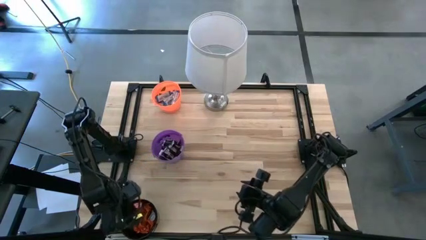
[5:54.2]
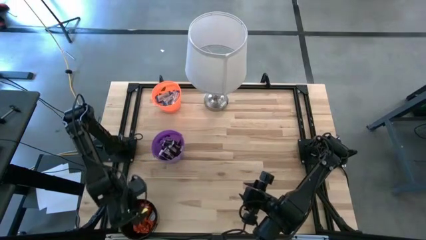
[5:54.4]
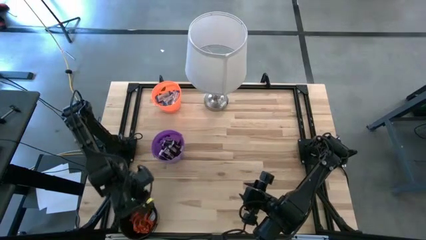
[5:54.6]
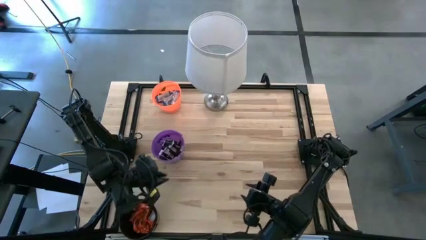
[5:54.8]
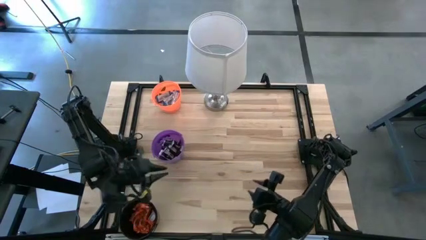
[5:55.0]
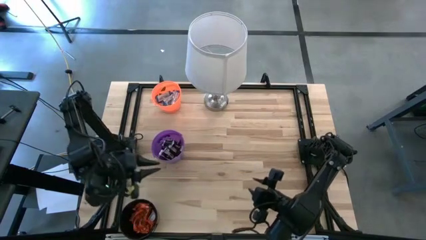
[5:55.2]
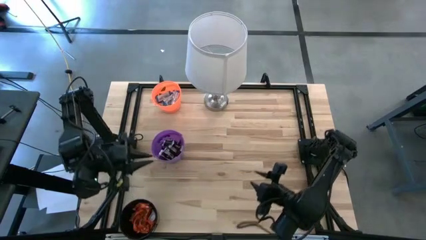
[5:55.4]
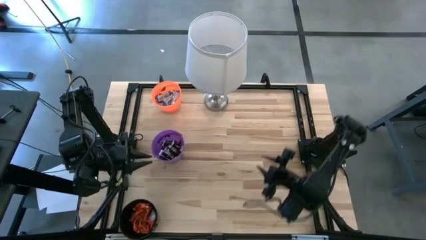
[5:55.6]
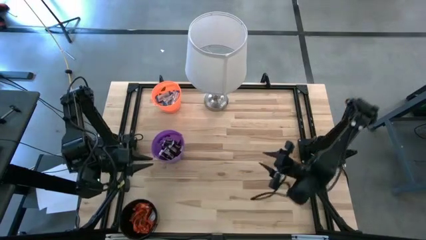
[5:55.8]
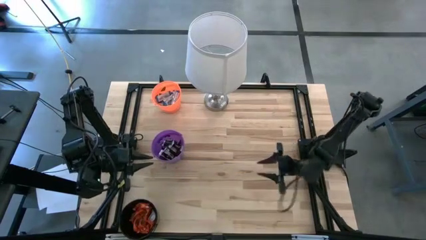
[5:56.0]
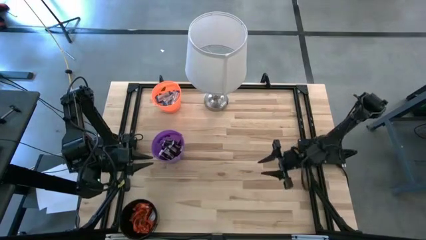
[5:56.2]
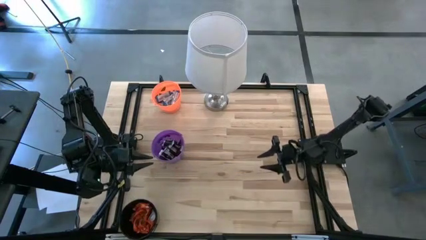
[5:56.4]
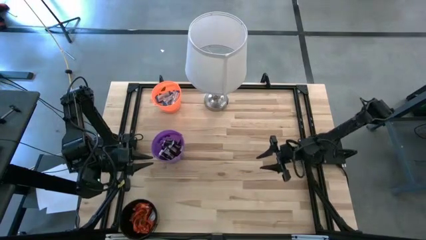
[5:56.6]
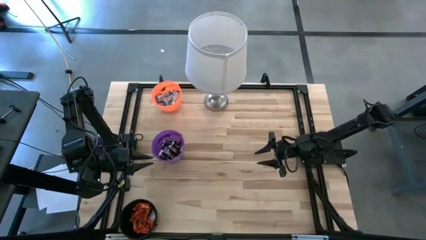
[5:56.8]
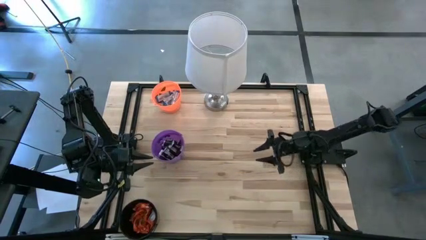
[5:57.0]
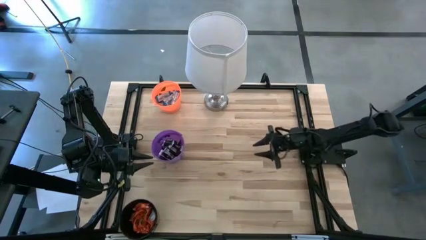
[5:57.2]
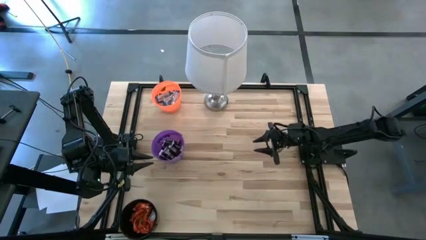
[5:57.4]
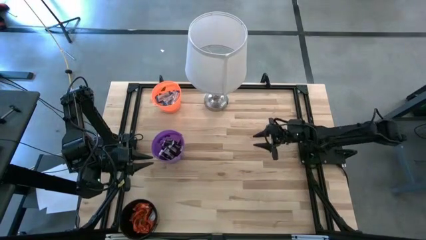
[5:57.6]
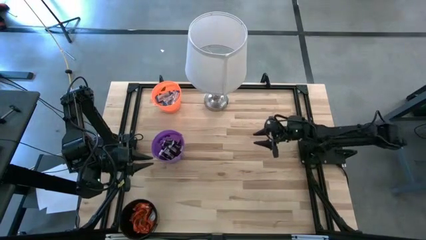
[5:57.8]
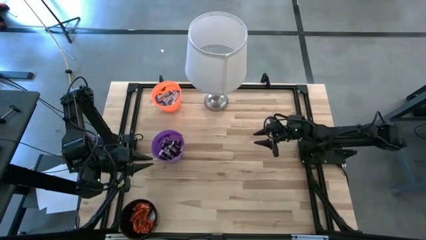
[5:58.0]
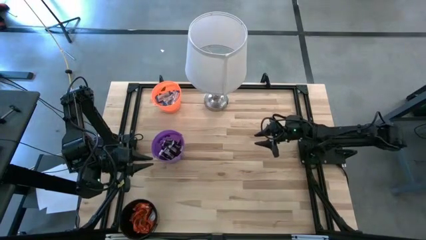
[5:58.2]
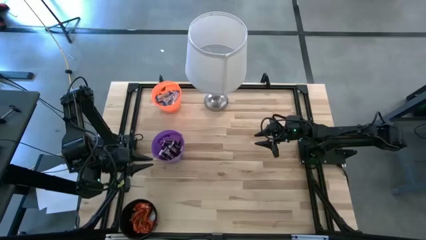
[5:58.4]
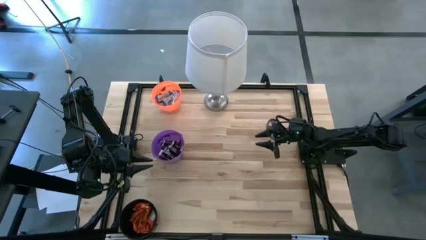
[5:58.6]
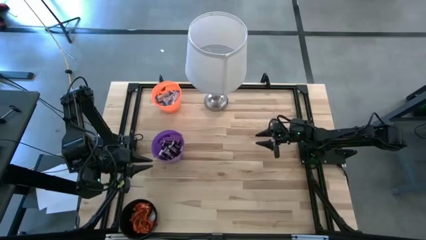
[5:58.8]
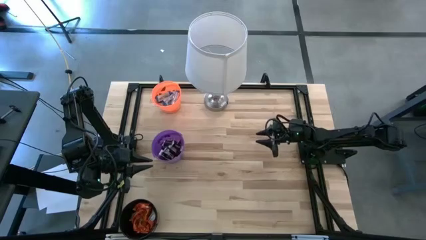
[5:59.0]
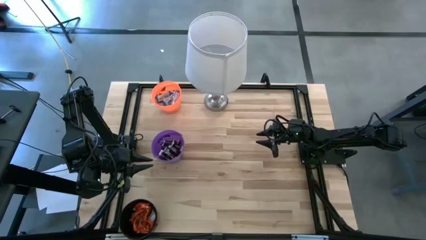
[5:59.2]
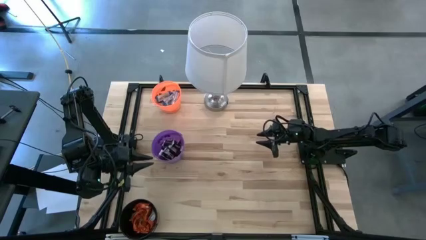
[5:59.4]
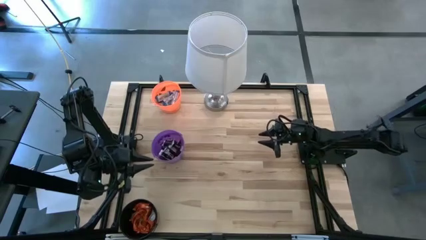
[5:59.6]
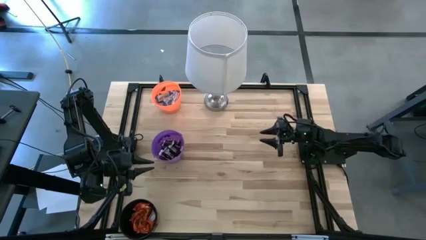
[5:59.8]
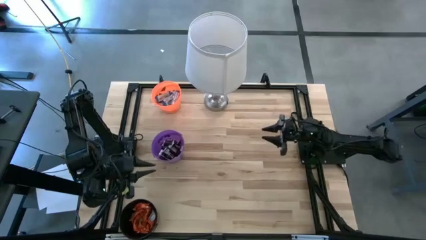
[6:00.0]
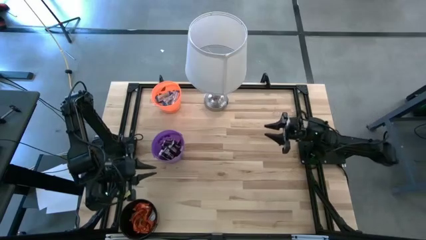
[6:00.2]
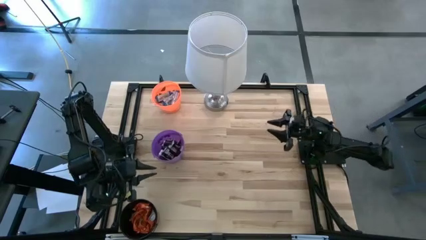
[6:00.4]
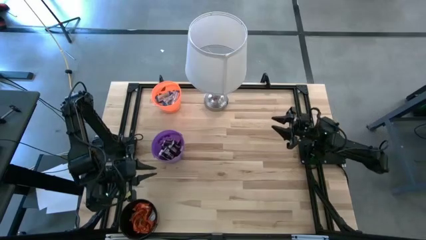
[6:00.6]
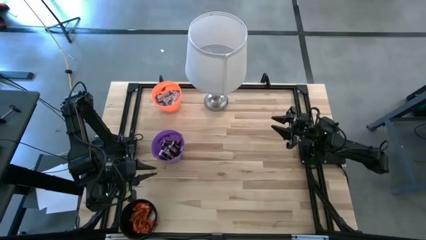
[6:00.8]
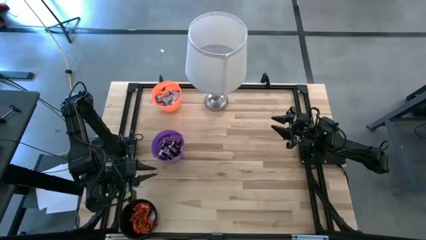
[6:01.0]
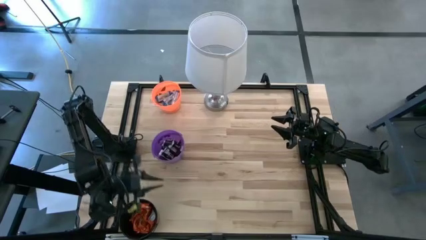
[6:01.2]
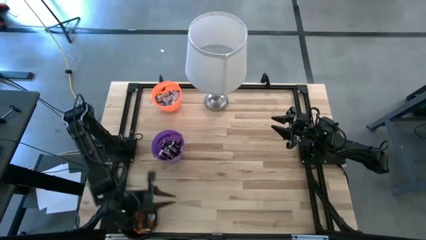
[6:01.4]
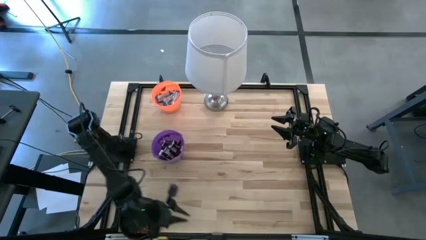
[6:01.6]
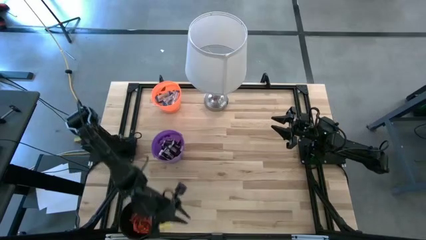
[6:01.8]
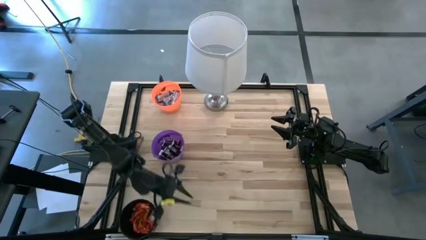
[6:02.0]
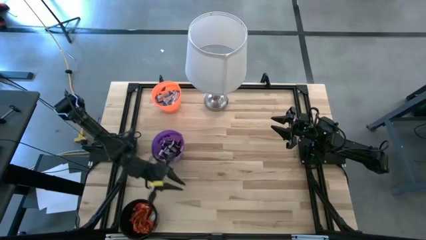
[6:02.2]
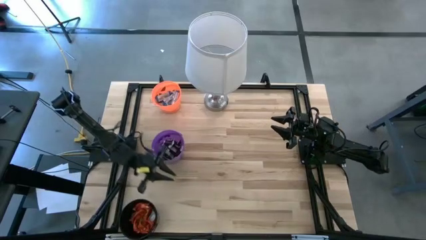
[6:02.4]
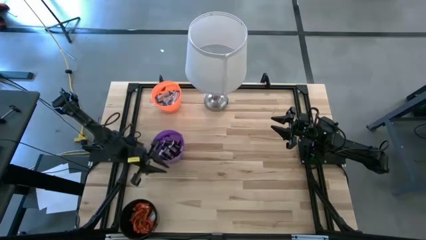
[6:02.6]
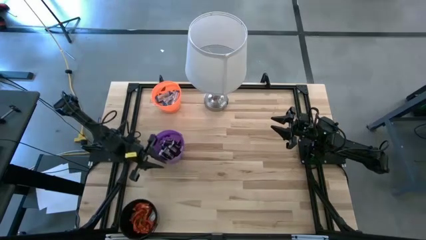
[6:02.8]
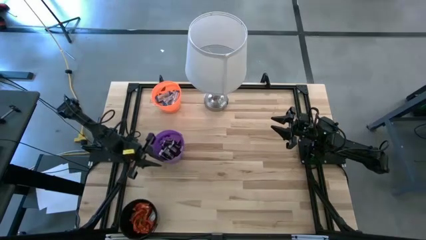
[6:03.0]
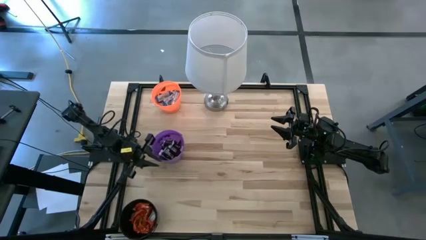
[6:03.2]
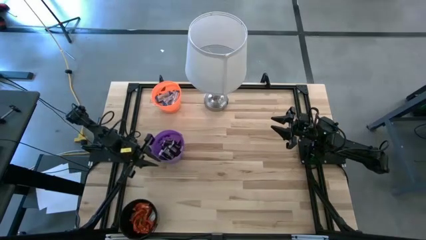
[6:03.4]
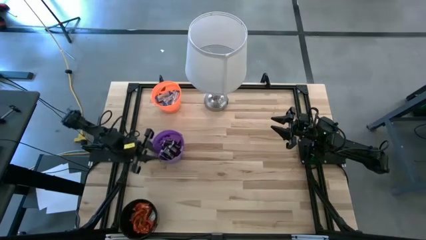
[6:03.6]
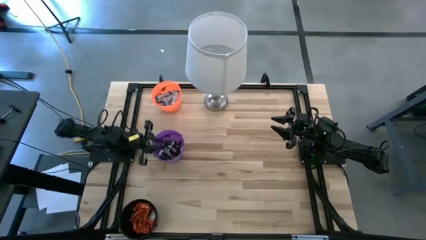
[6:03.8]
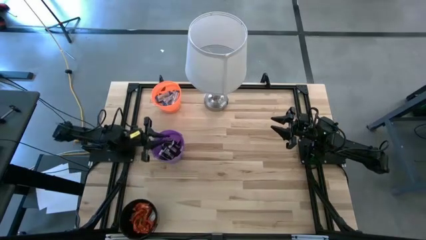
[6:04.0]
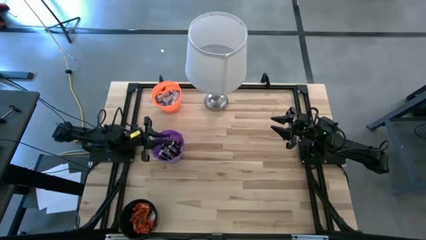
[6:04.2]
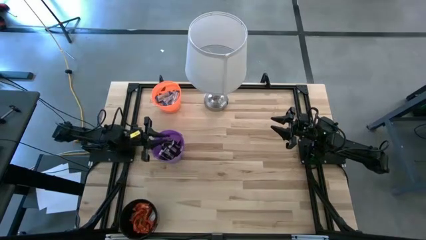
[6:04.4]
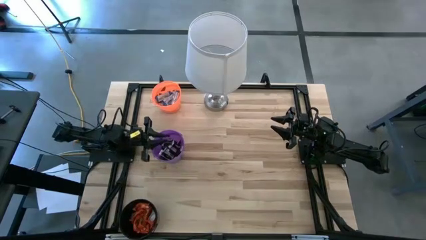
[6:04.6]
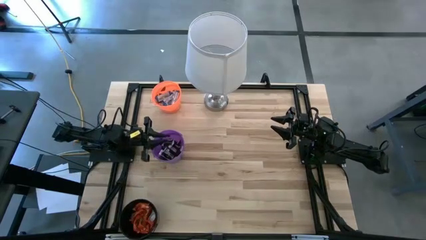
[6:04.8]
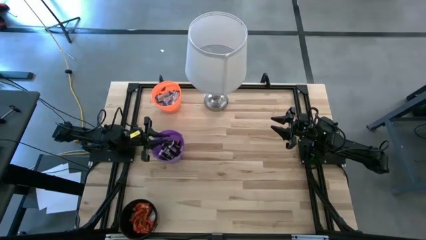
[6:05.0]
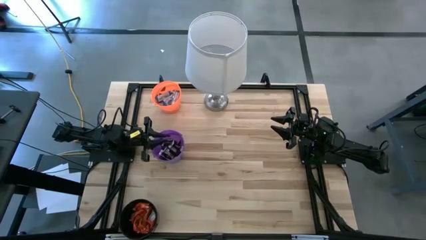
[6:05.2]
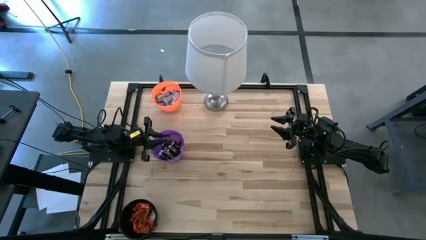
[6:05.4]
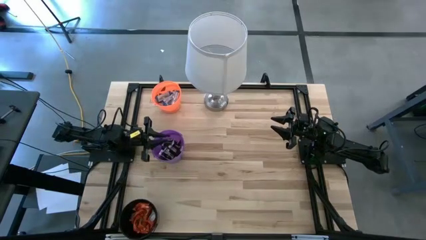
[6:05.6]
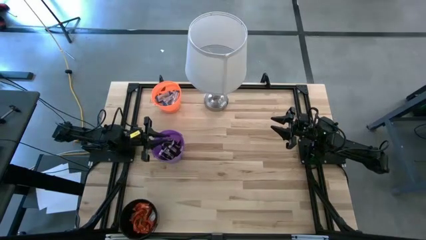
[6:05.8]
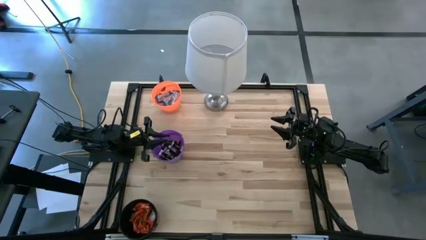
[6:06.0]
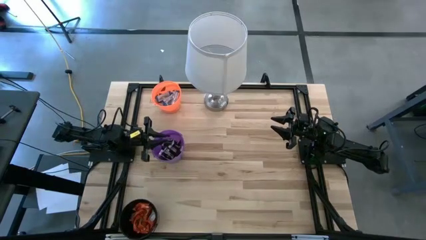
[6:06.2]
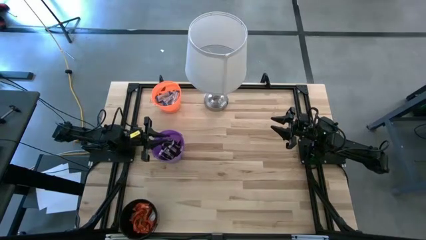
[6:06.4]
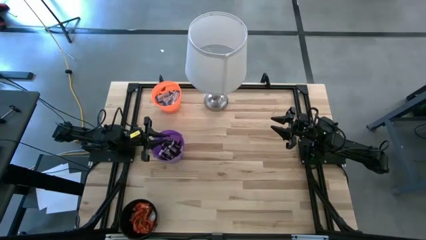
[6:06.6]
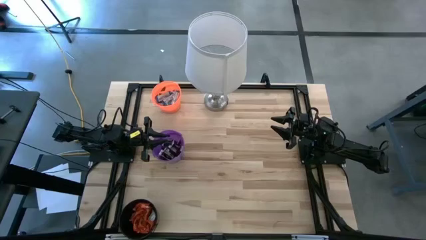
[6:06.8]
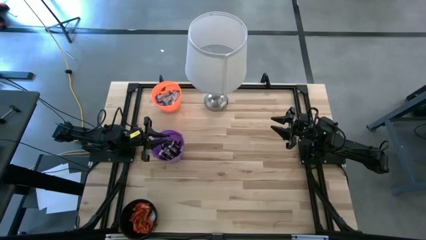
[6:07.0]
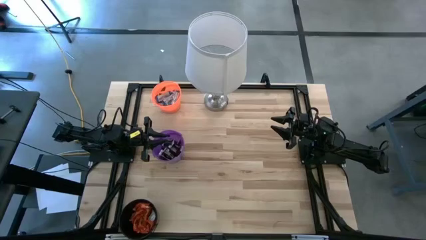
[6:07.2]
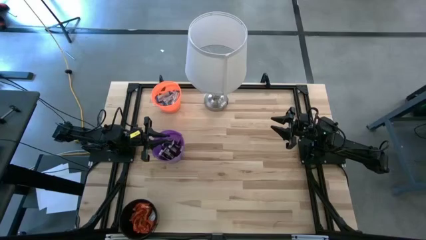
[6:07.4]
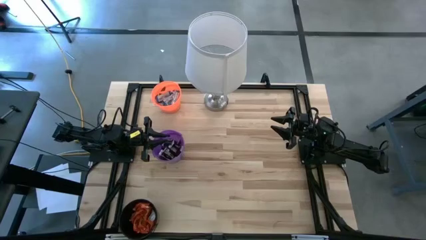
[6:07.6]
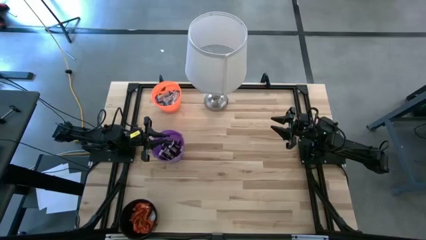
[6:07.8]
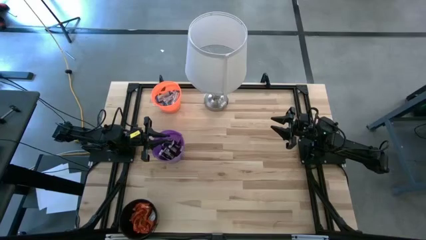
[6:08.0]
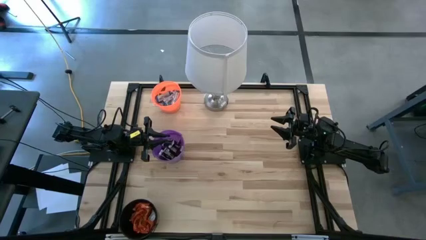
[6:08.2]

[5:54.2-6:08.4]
Task: Sort candy
Return to Home Position
